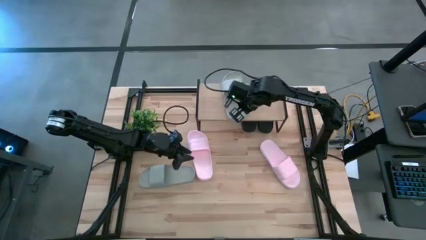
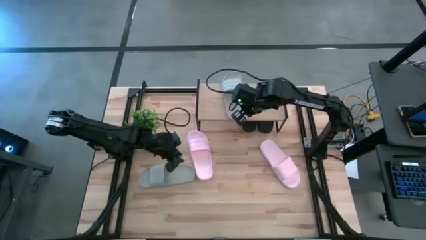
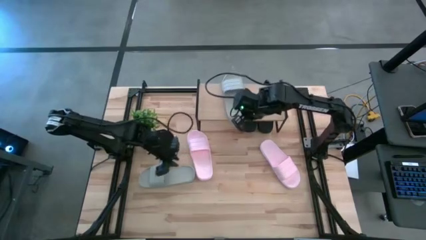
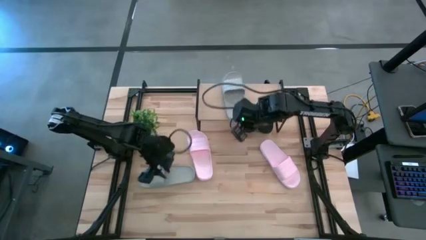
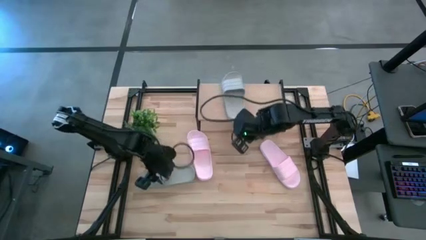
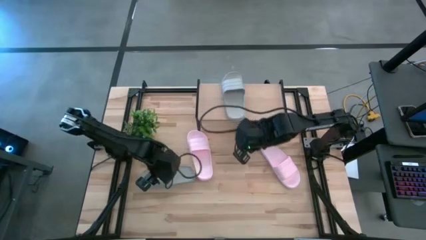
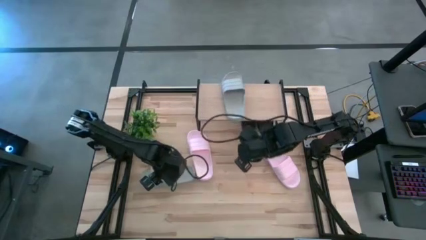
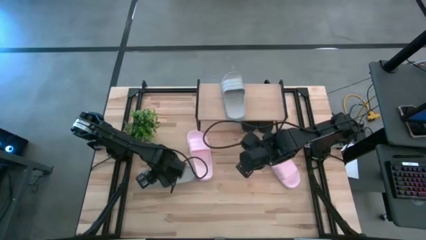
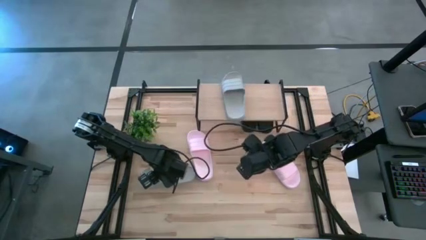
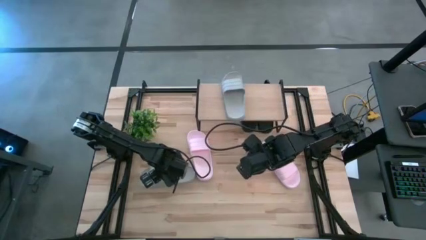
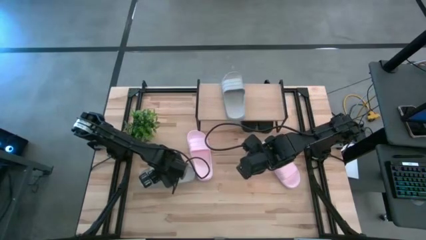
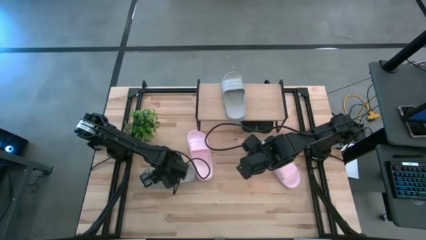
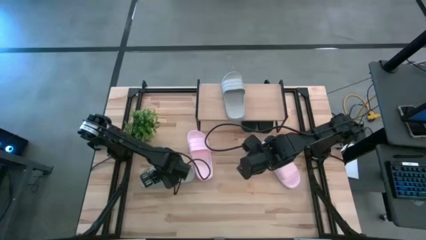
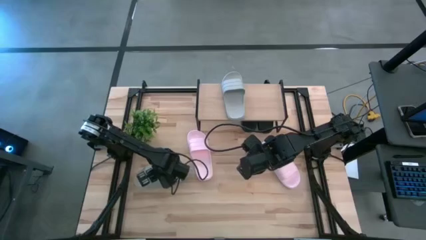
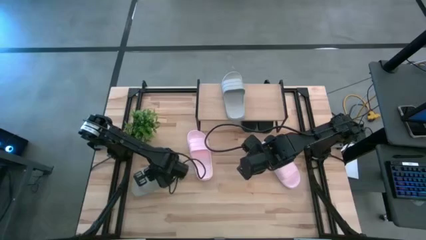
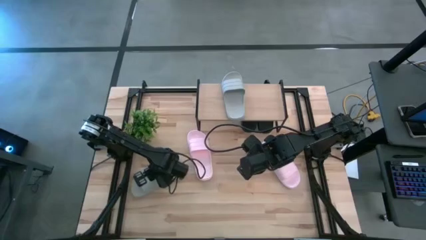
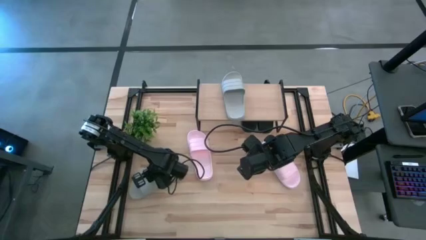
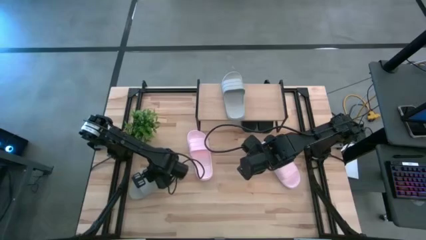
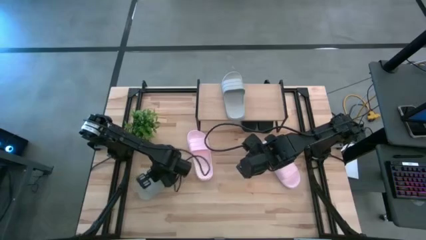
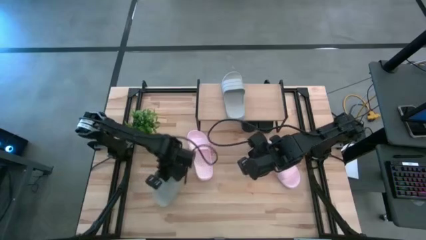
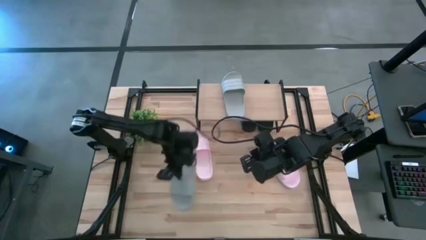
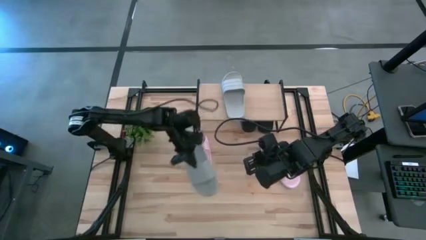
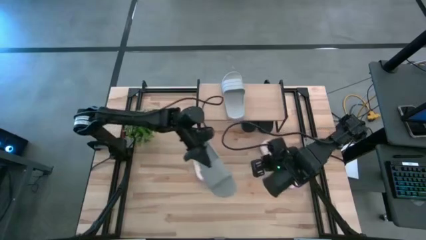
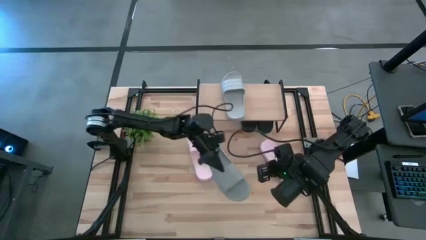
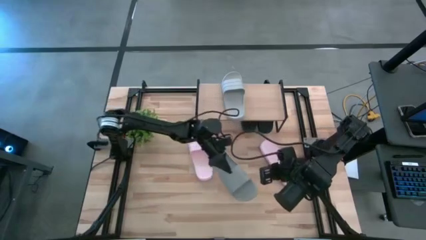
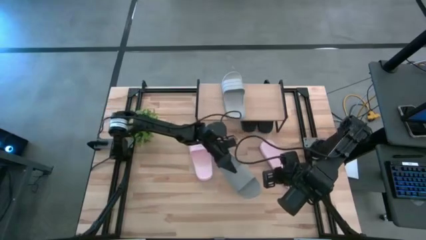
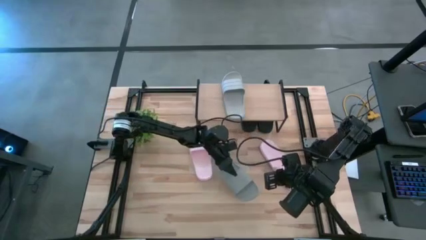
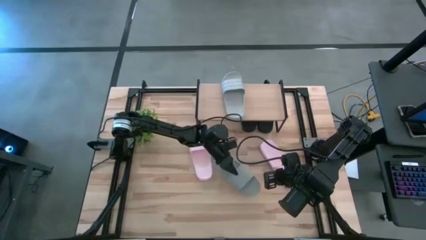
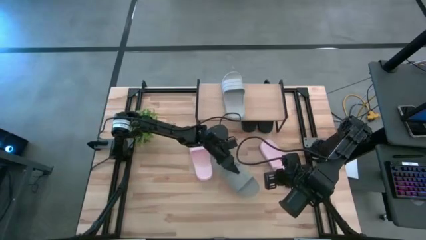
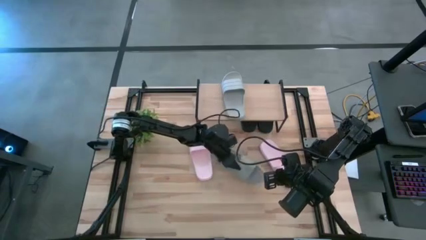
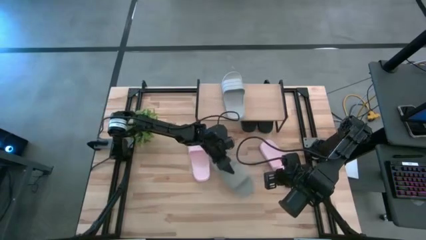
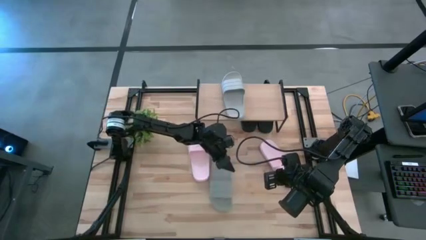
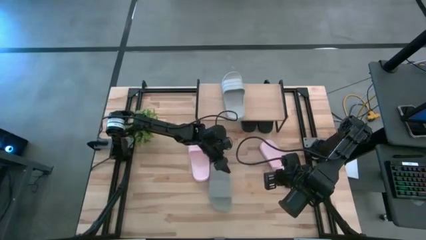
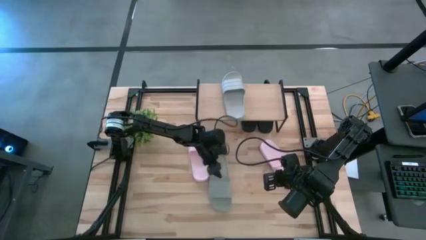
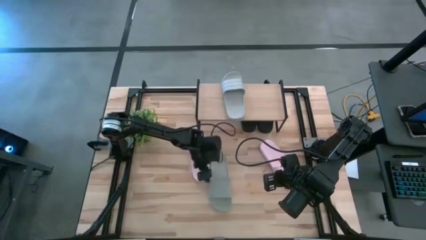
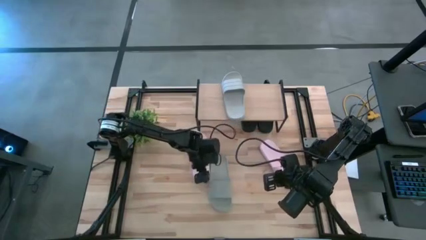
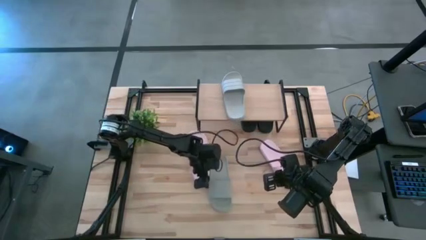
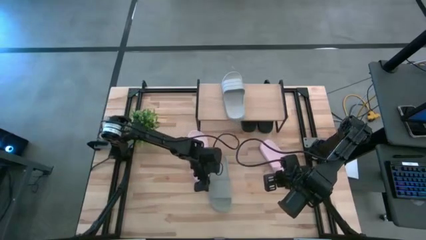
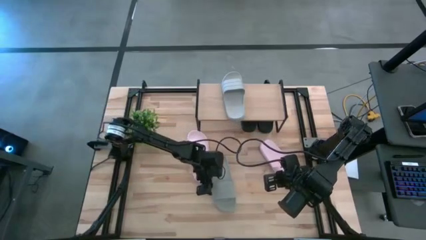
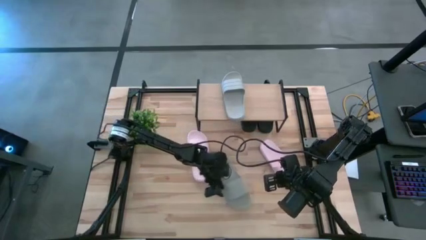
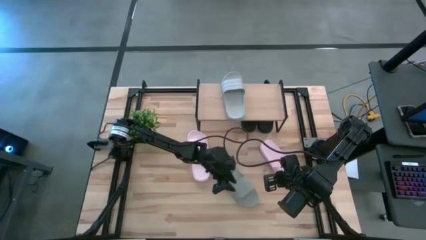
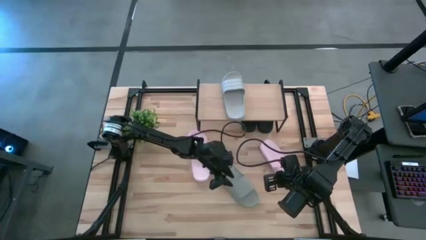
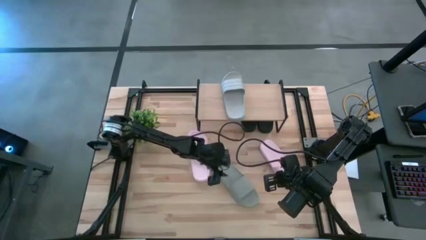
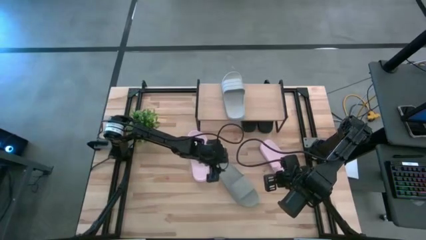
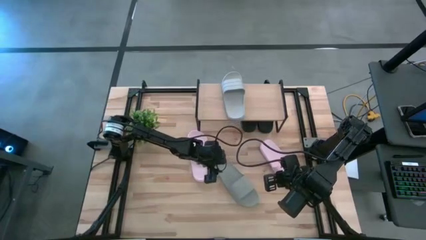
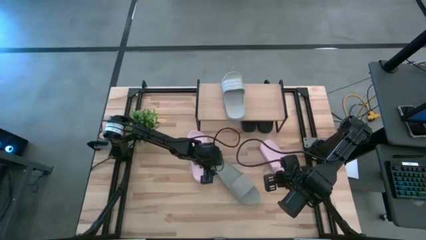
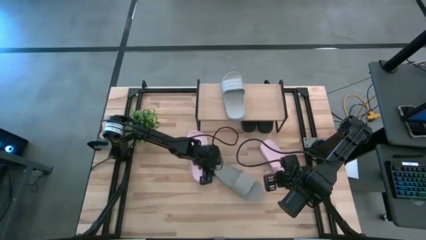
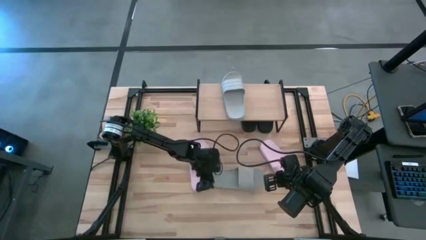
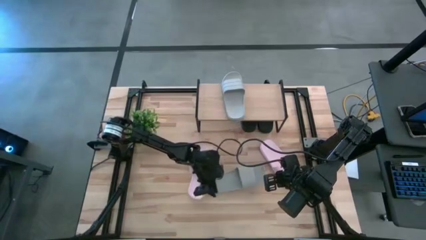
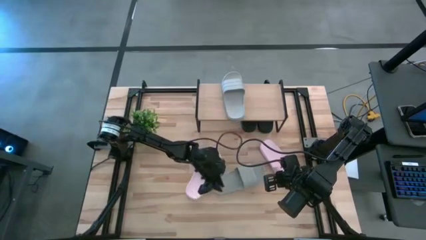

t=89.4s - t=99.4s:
Task: Pick and place slides into the shelf
Put the gray slipper on the shelf
